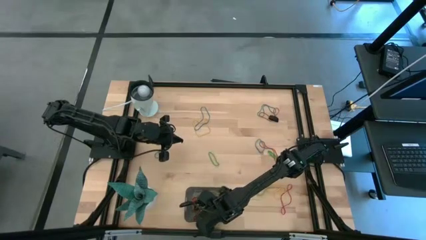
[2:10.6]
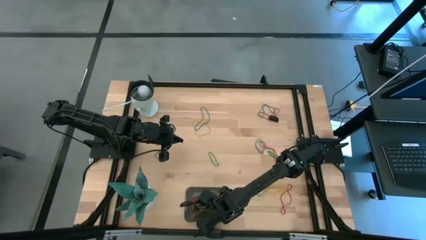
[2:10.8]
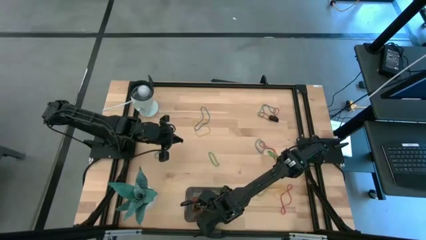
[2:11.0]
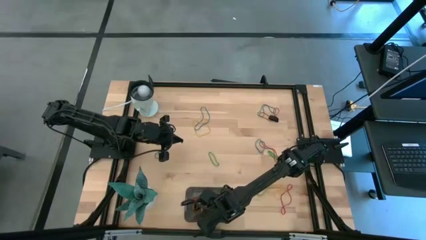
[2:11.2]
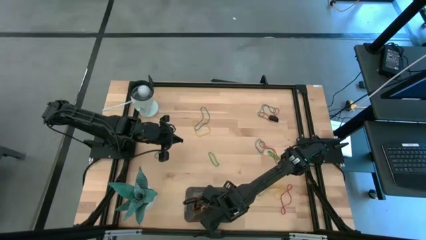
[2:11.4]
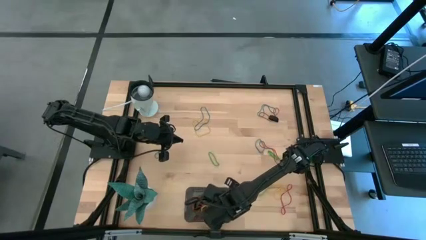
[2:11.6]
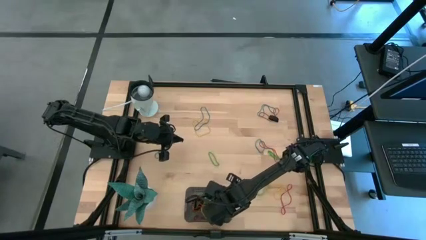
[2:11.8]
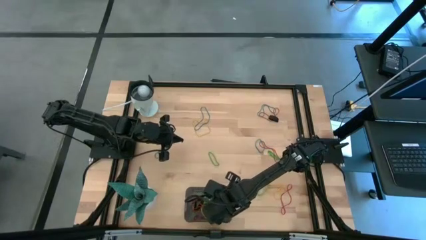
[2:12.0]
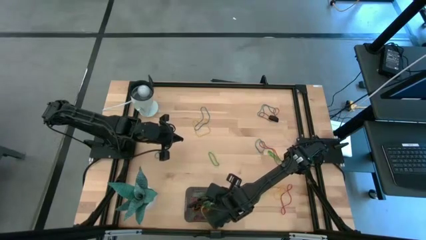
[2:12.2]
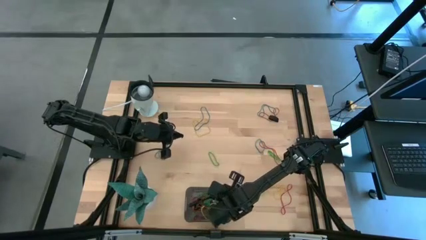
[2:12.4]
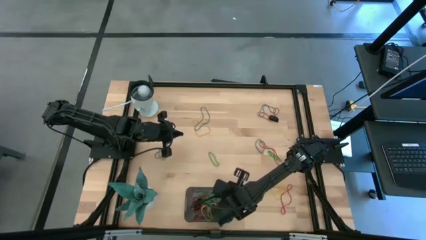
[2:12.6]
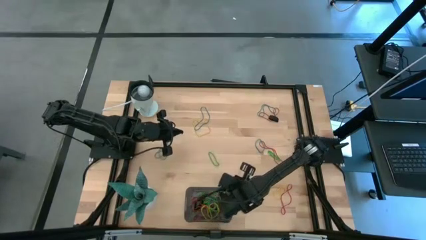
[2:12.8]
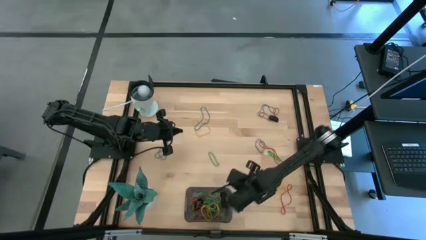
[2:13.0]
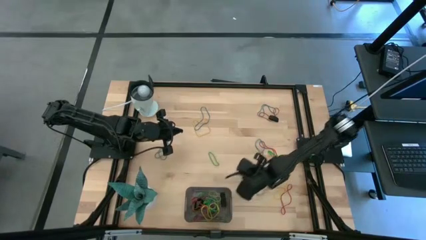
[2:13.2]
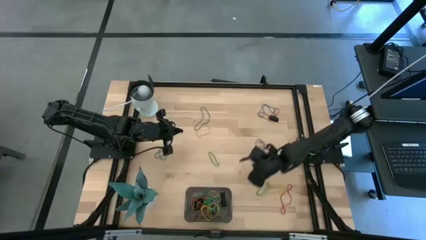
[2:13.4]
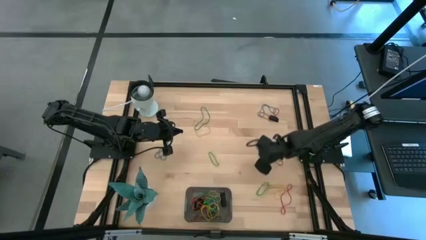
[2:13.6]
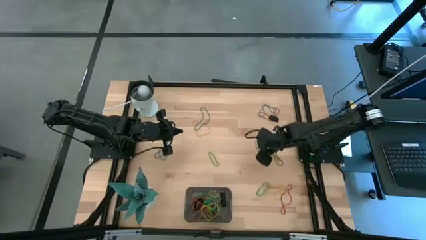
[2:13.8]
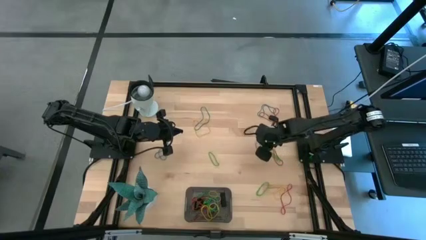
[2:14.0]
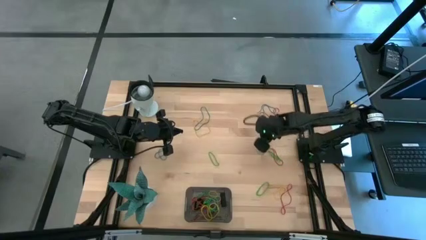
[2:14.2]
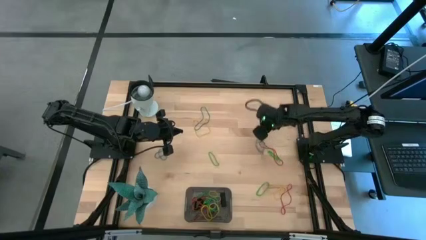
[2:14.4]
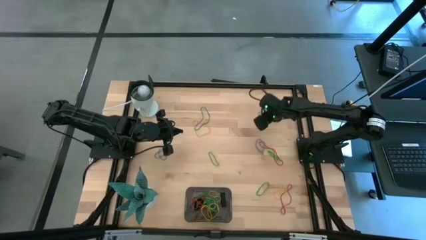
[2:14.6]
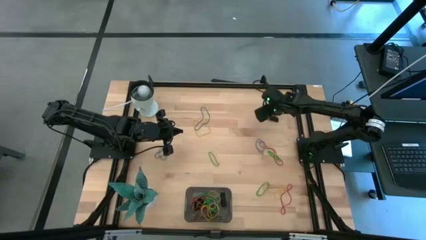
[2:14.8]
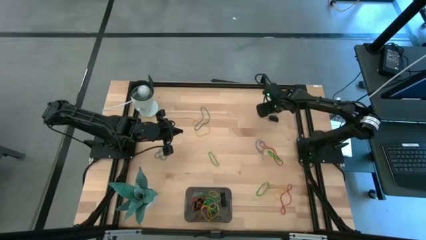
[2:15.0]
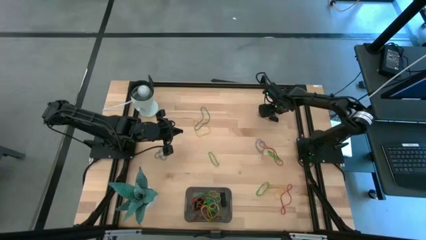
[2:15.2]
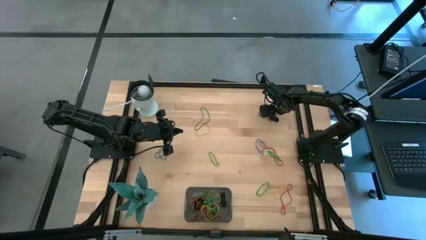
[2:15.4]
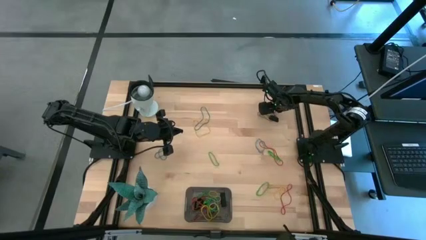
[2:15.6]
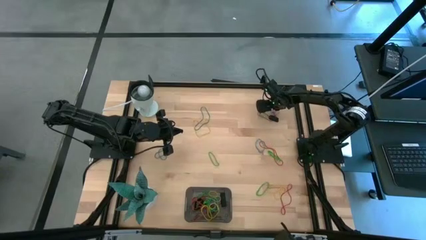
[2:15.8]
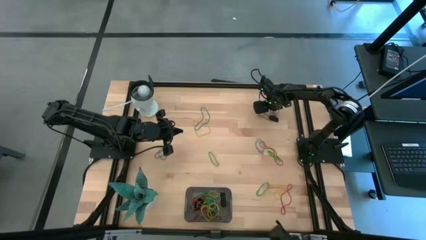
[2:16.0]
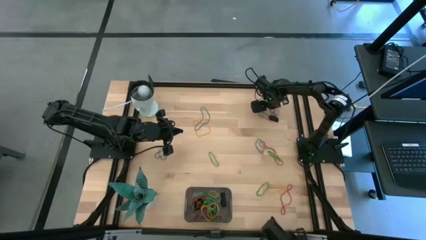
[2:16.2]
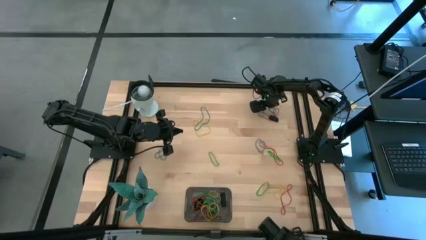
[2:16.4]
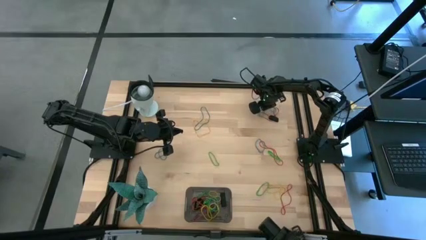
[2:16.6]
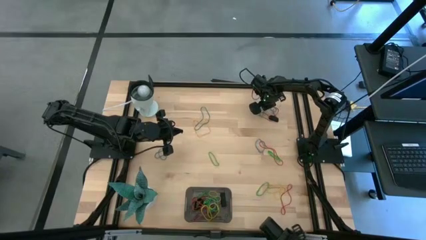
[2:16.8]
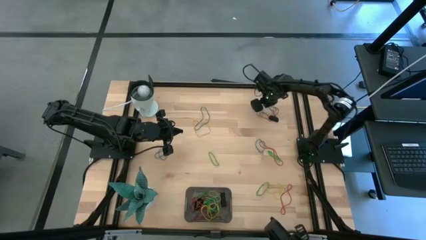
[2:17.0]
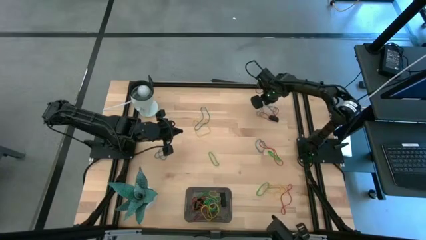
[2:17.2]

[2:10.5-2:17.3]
Task: Pick and place rubber bands into bin
Put the blue rubber band into the black bin

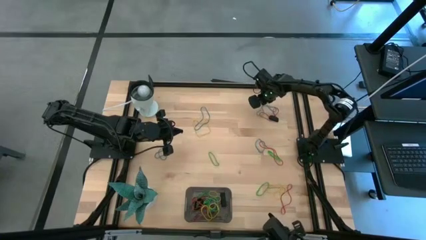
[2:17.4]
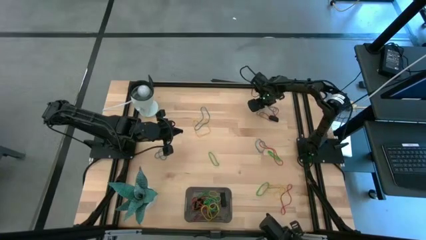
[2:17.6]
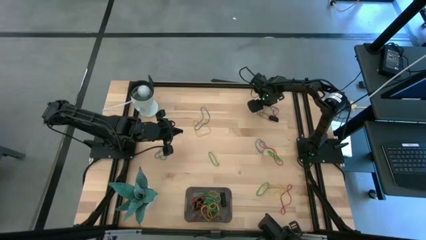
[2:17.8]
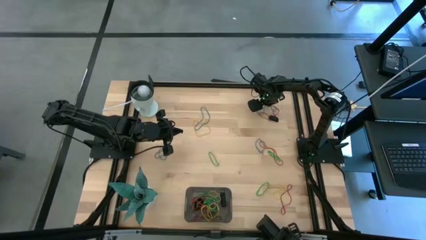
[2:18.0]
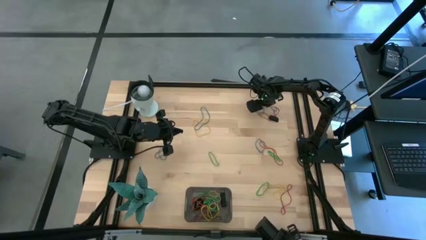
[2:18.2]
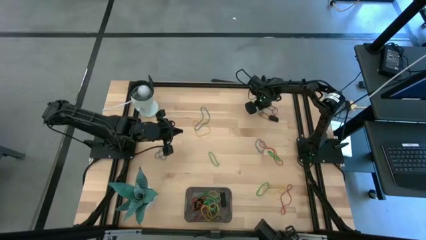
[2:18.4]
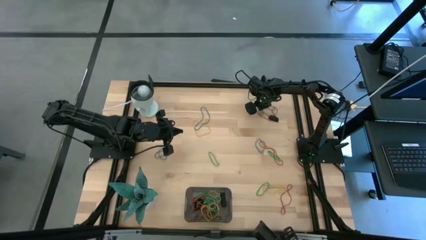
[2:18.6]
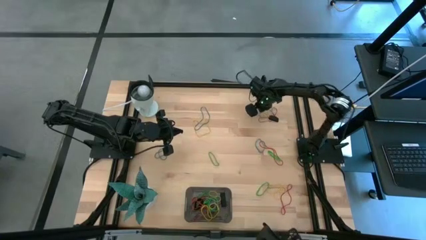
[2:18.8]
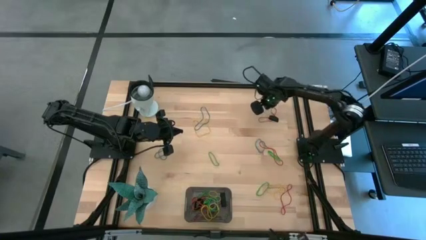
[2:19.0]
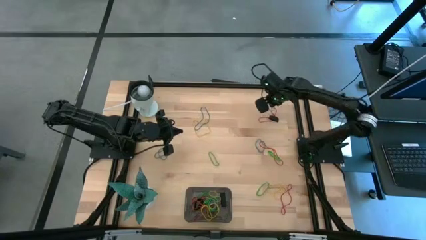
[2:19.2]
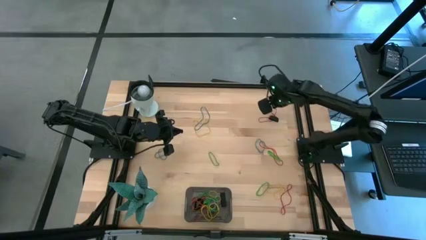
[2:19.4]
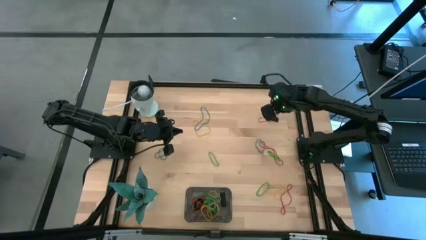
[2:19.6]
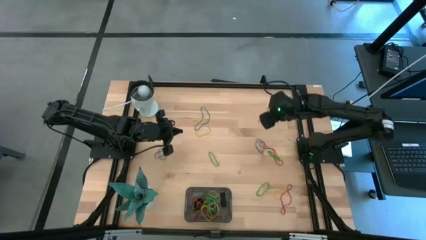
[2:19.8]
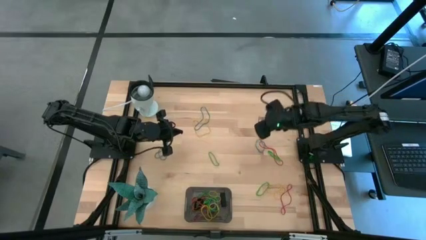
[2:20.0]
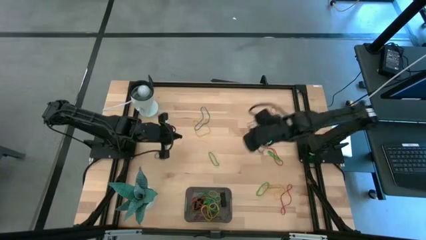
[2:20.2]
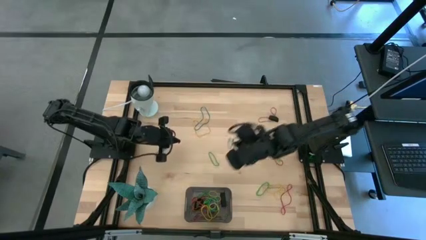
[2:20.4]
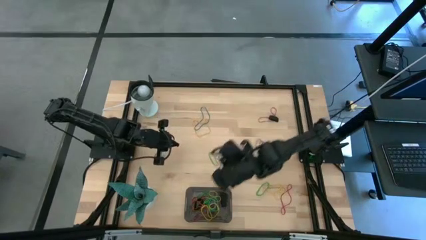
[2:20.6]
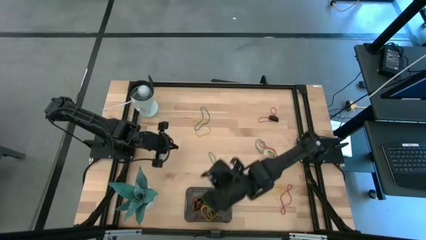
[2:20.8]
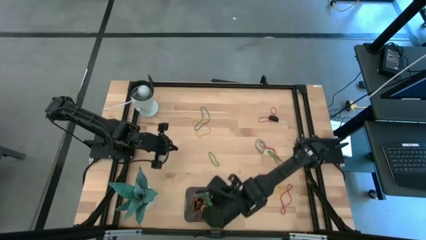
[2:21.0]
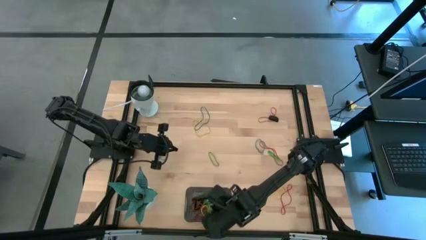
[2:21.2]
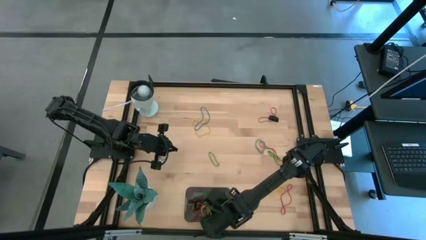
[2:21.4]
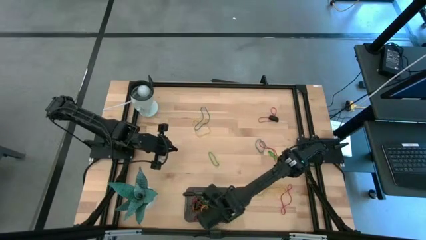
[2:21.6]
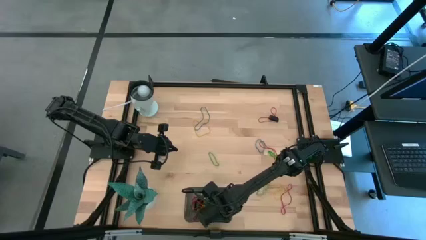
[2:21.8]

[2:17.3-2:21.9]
Put the blue rubber band into the black bin

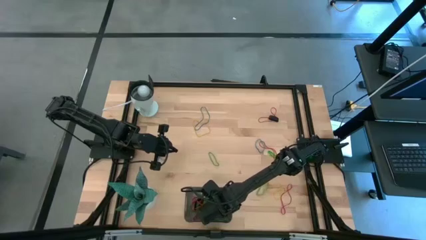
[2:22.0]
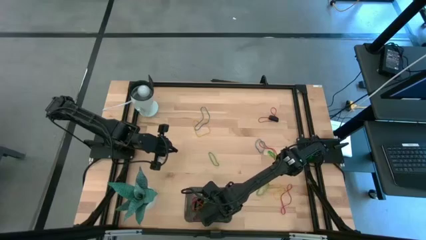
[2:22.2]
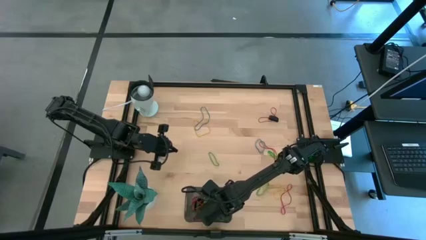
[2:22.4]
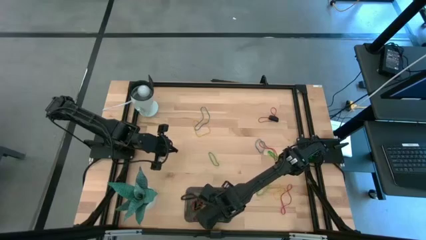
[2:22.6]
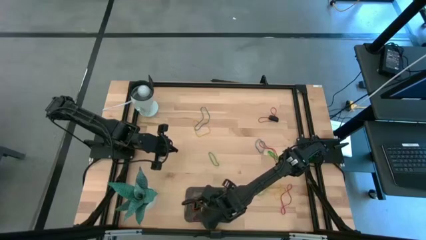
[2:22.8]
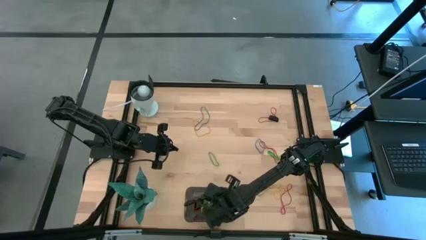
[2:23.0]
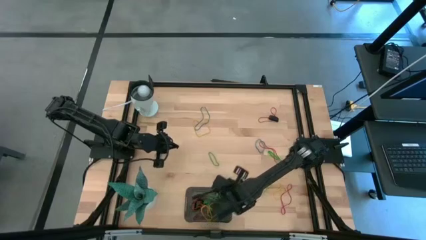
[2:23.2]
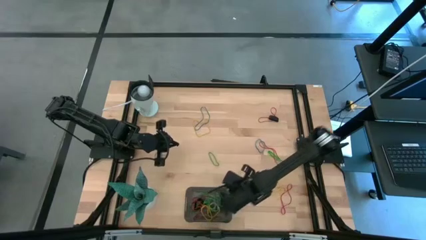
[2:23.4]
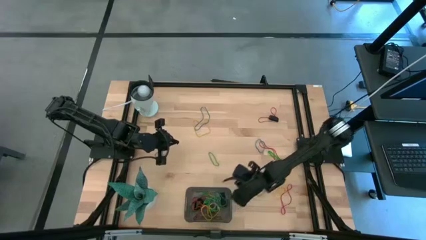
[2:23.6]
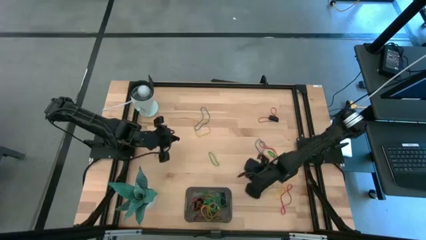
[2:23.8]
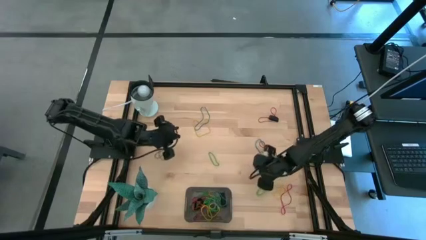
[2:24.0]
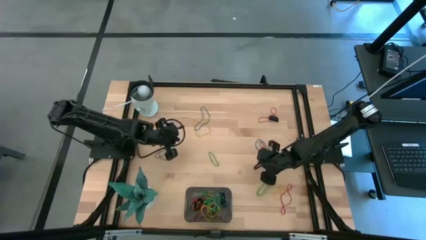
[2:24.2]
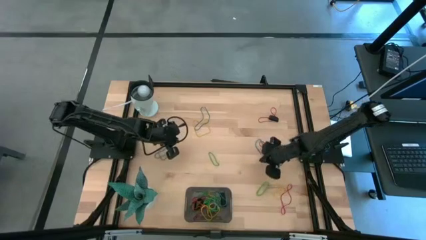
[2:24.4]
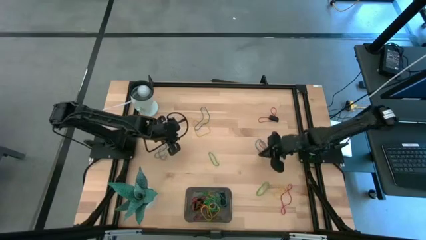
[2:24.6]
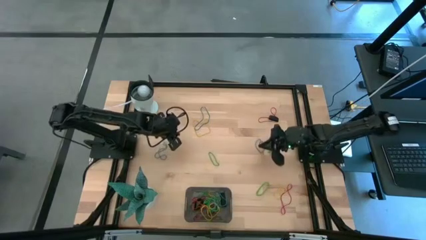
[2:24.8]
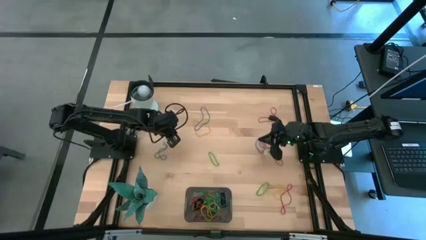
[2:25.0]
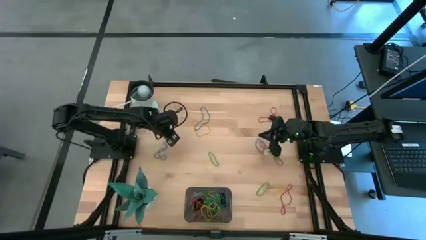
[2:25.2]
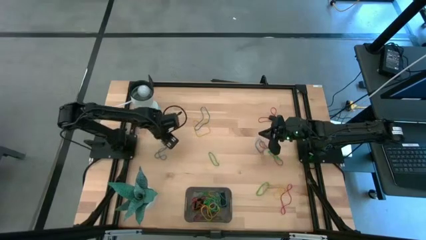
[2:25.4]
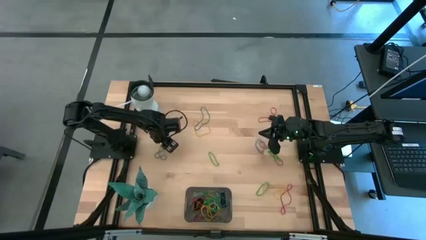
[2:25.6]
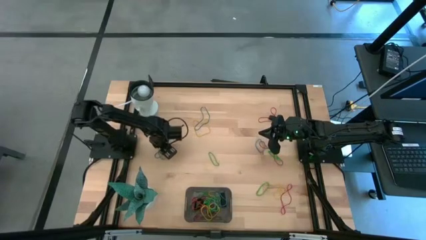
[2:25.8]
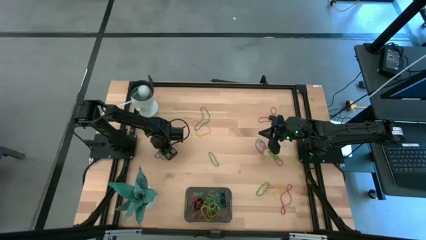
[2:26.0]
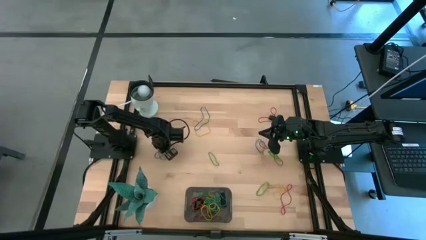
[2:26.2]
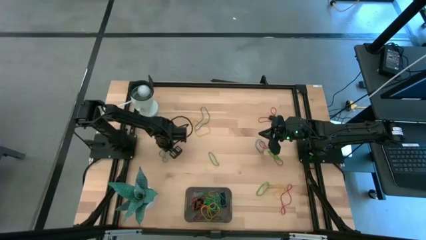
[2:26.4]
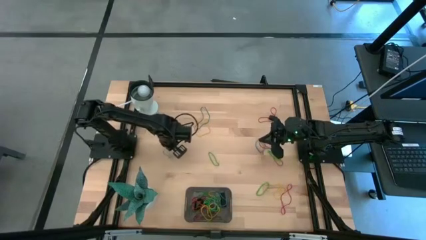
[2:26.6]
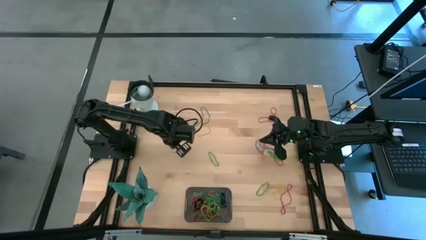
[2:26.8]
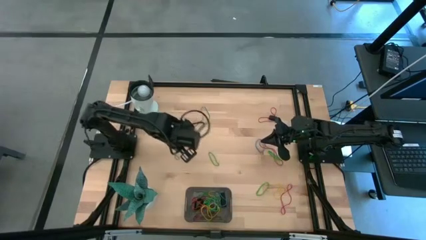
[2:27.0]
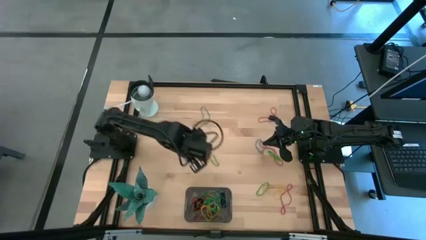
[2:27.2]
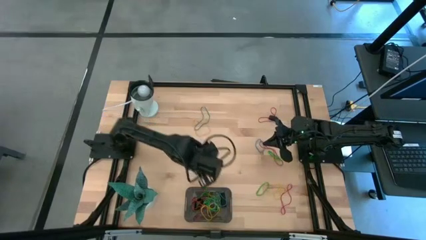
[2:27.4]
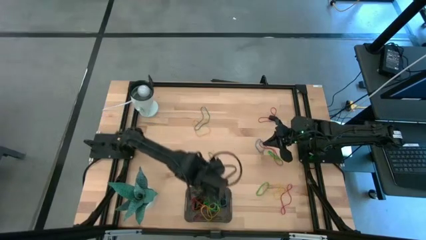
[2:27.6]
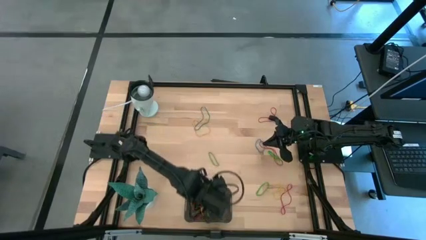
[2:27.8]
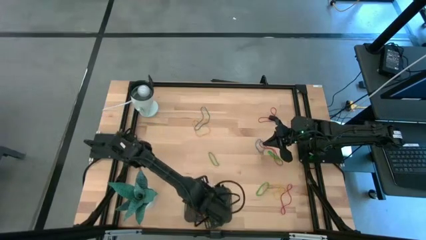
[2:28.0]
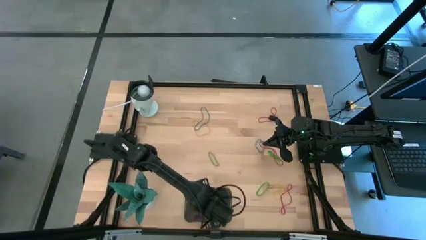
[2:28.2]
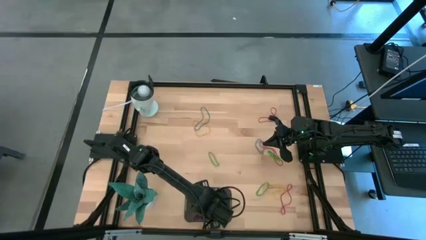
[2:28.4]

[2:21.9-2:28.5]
Put the blue rubber band into the black bin
